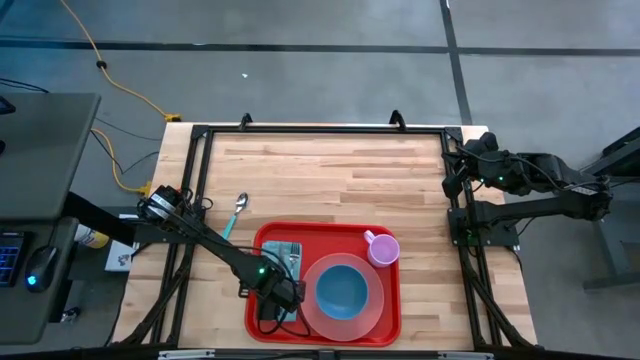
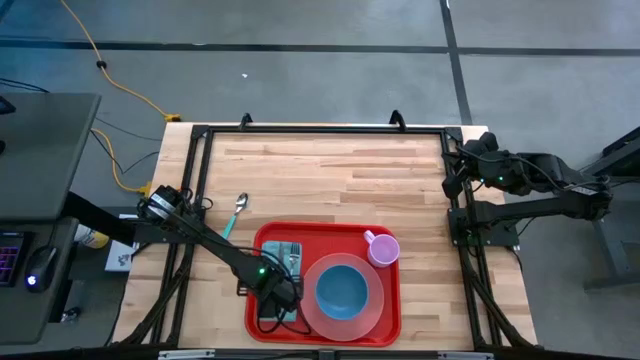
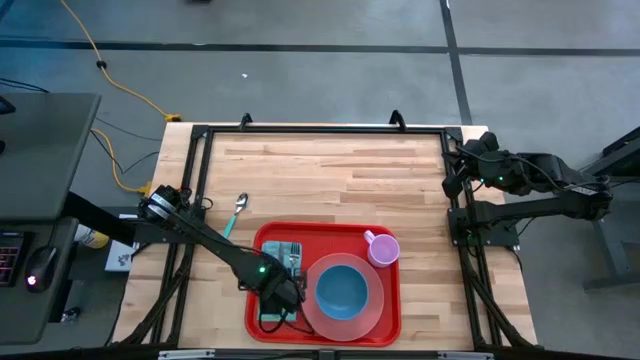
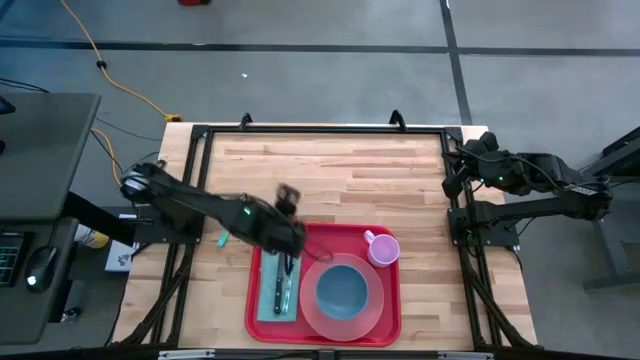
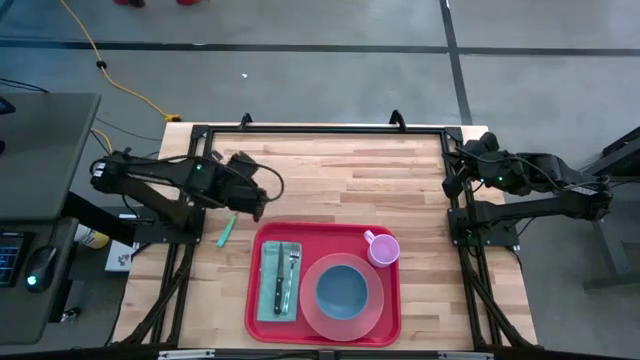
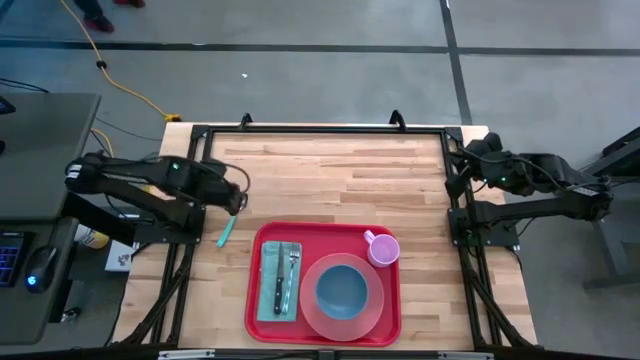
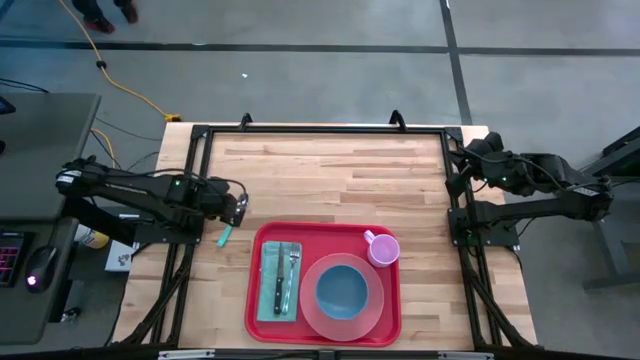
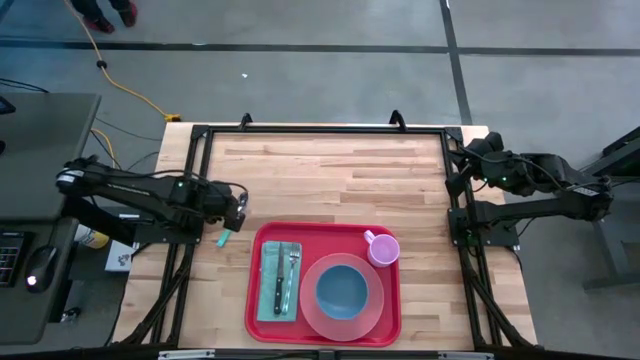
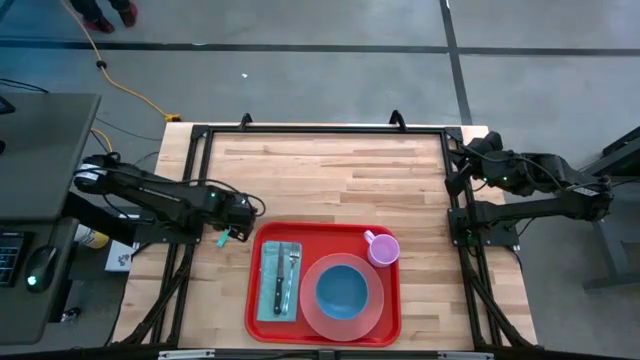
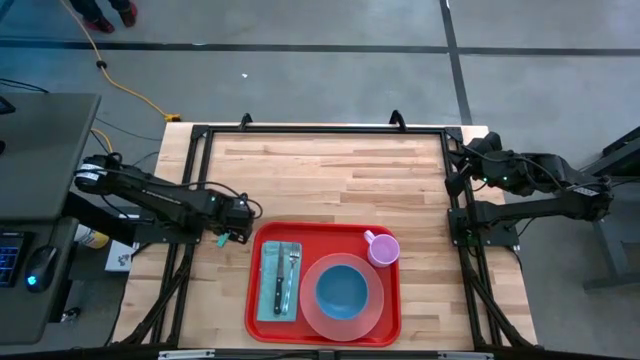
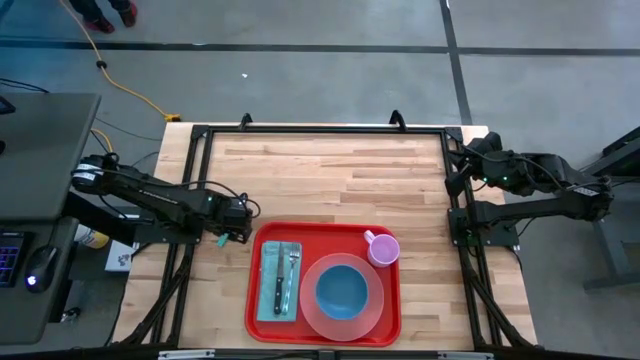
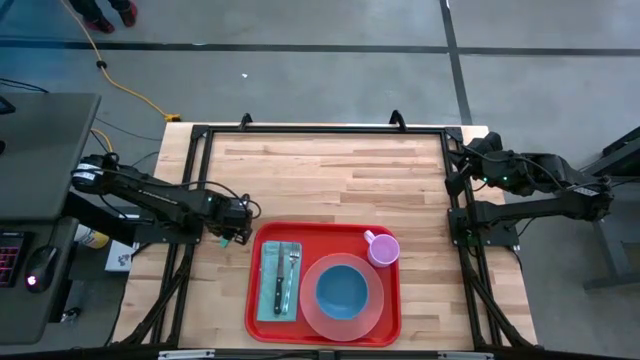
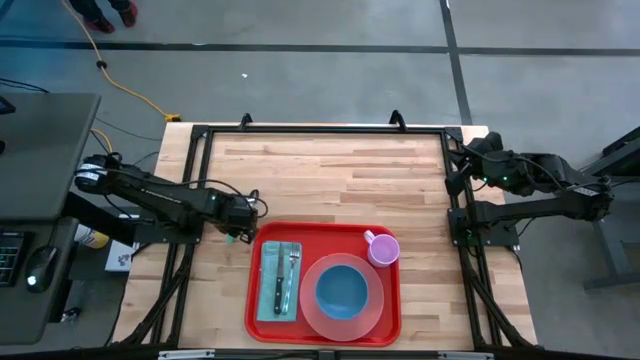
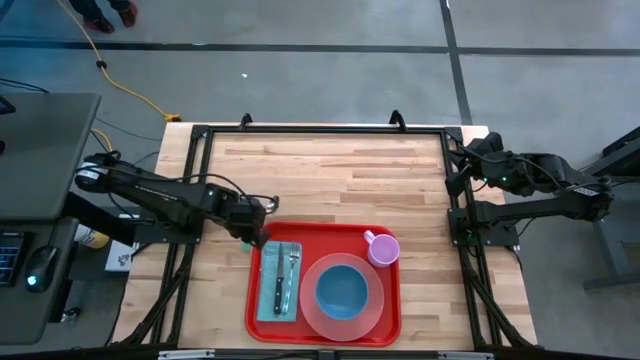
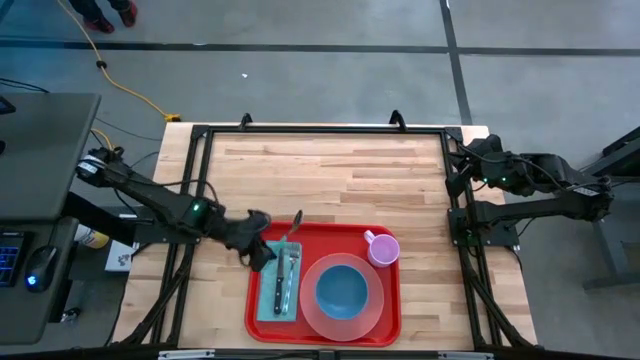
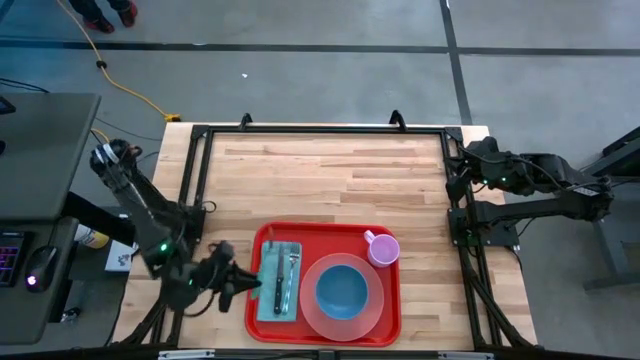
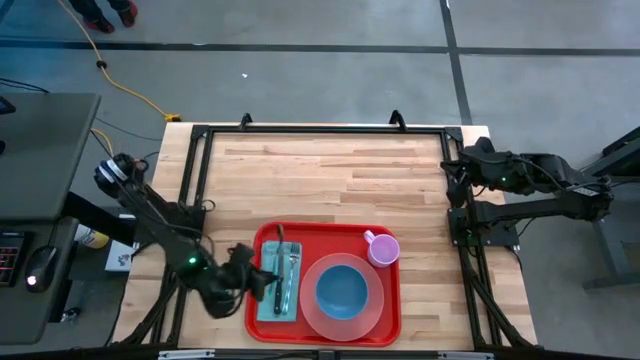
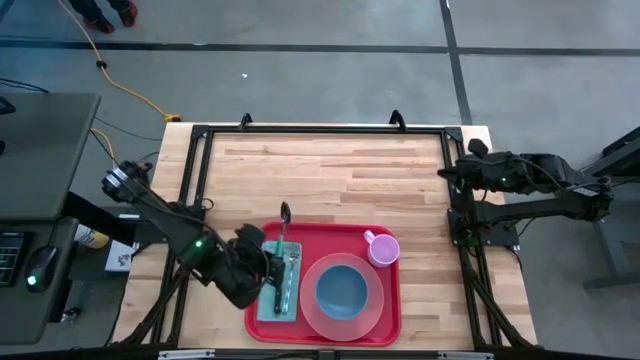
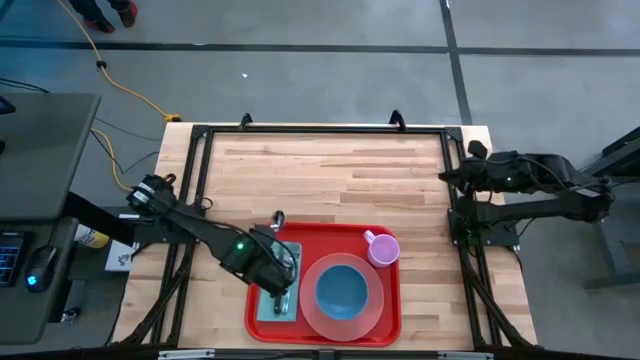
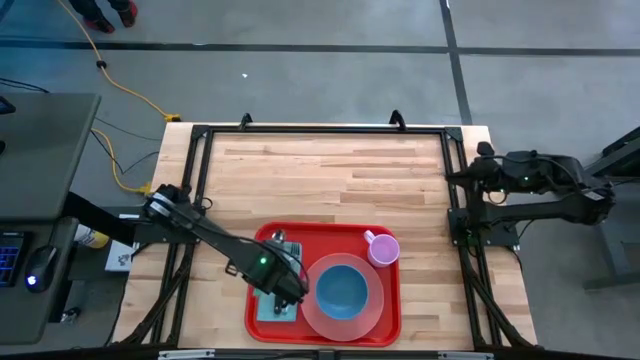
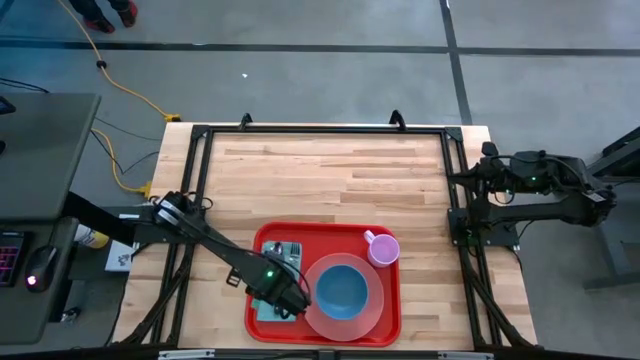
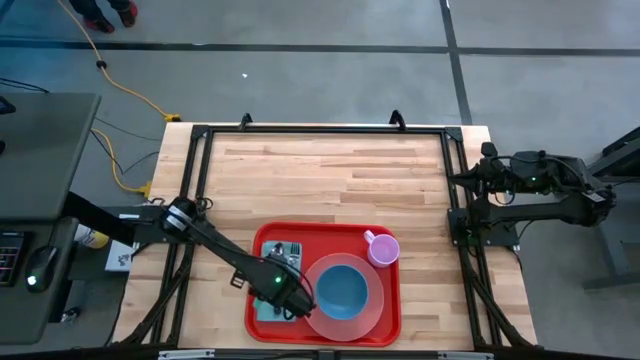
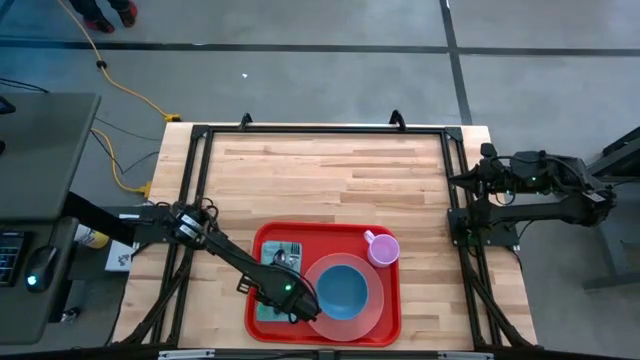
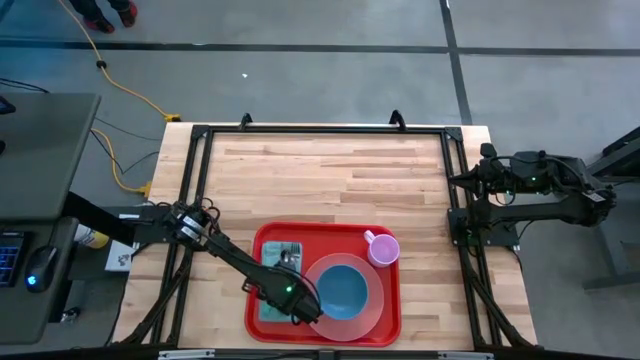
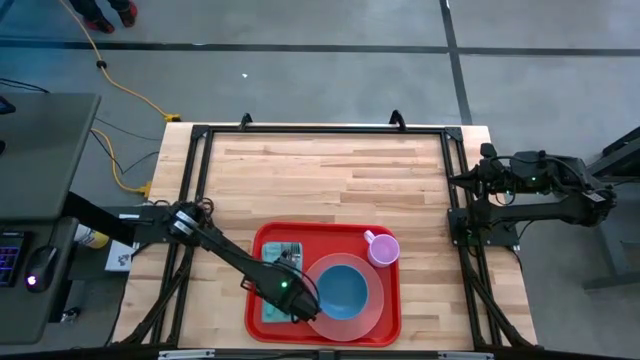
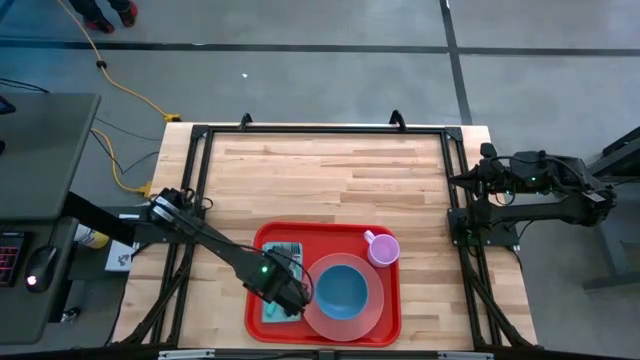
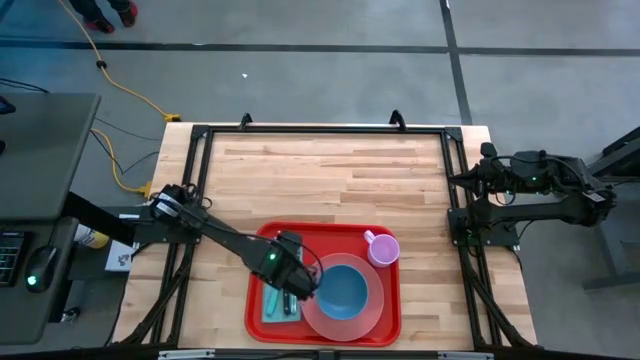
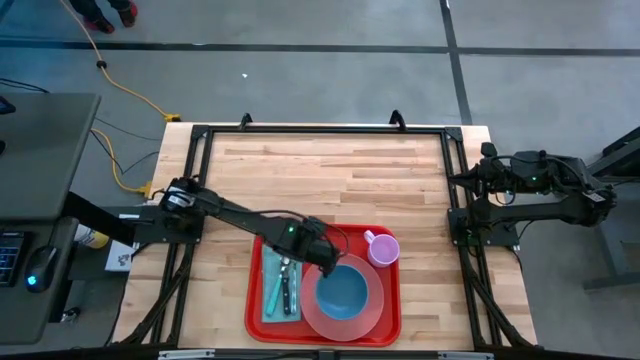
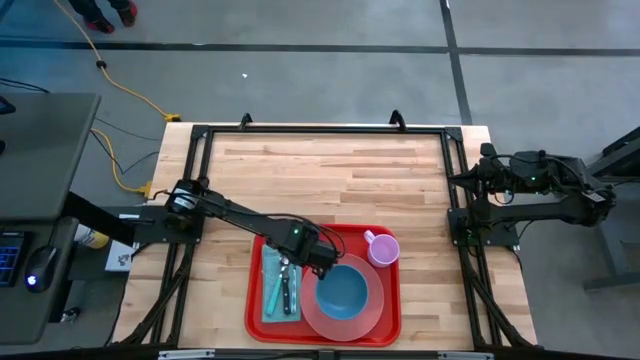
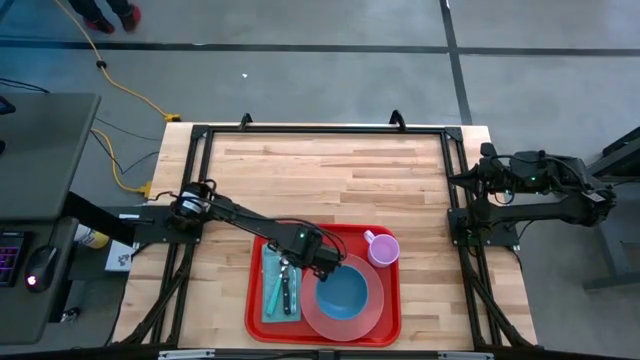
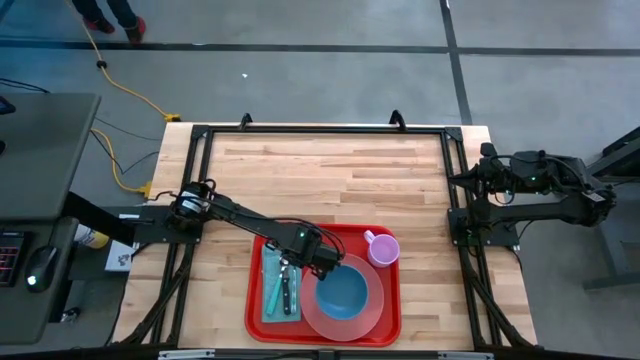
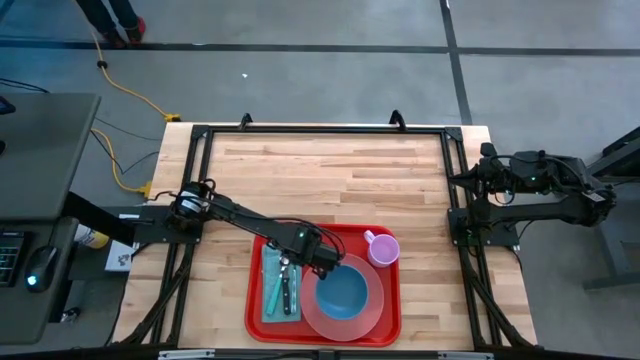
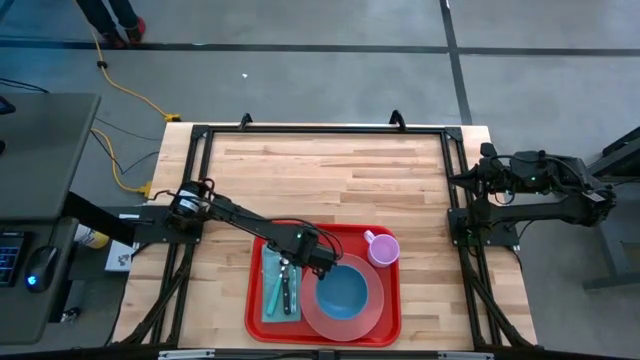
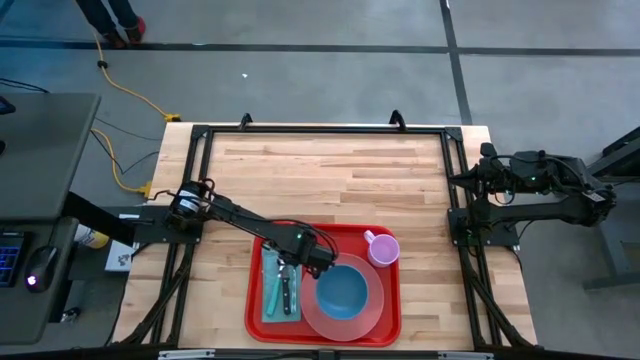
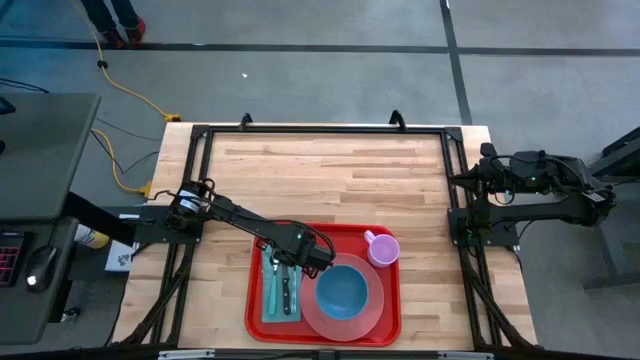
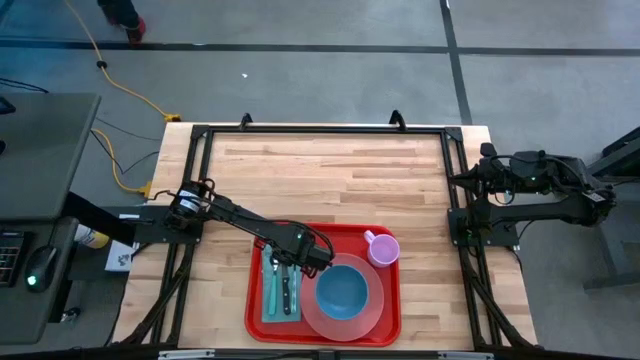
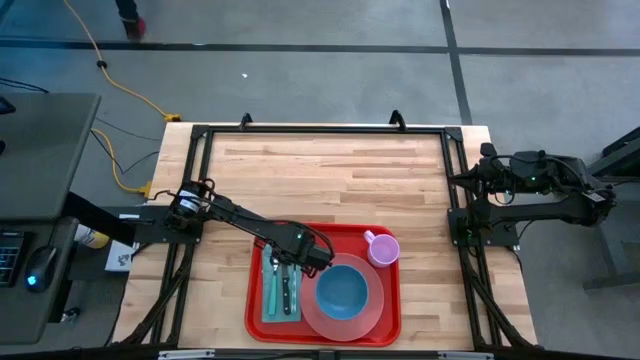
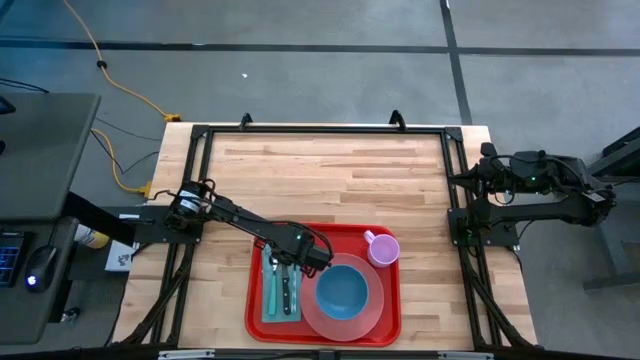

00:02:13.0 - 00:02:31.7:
Task: Set up tray
Put the blue spoon on the blue napkin to the left of the black knife

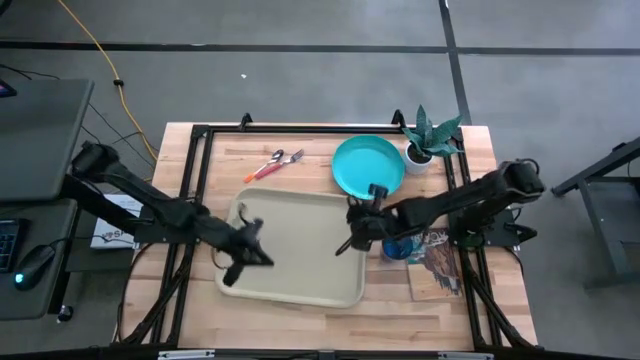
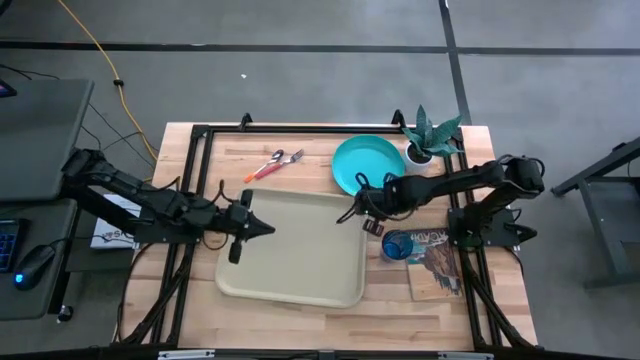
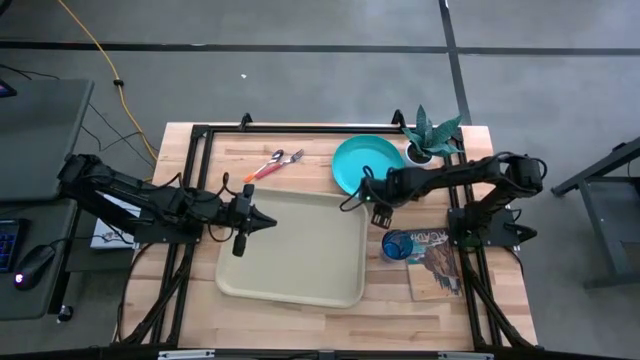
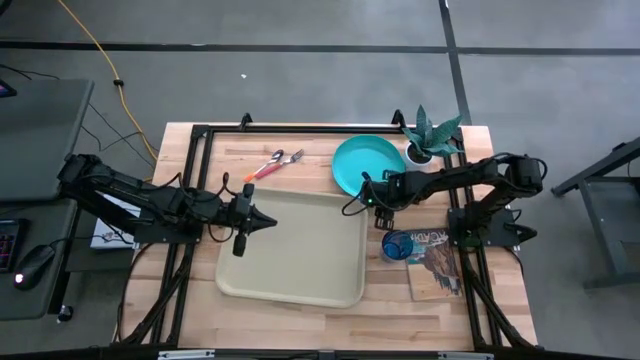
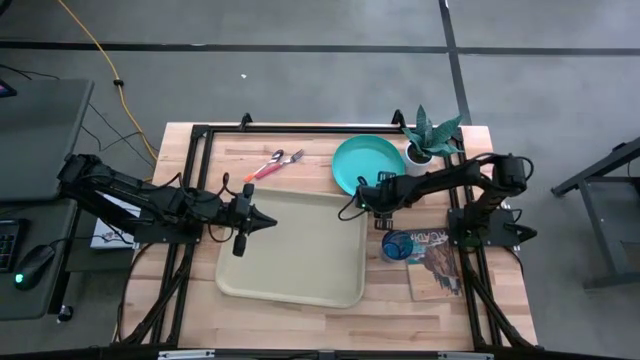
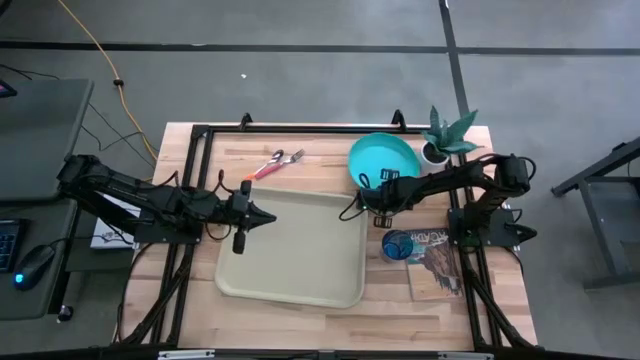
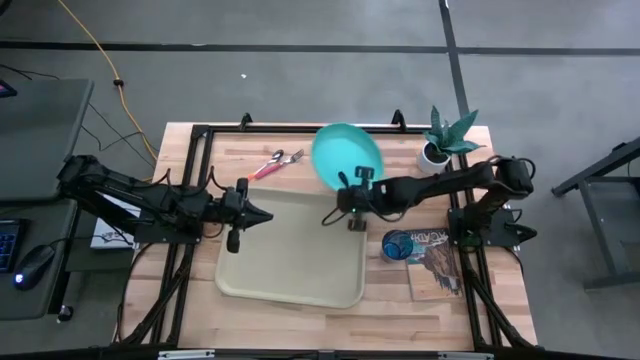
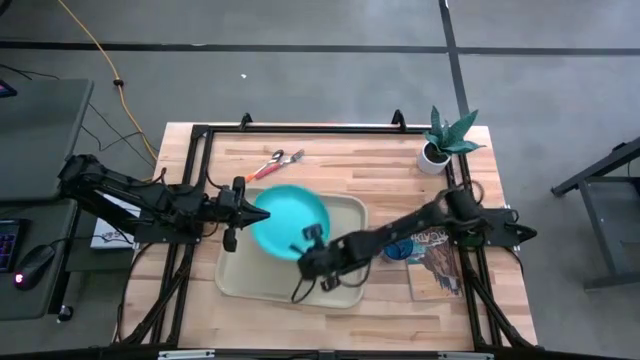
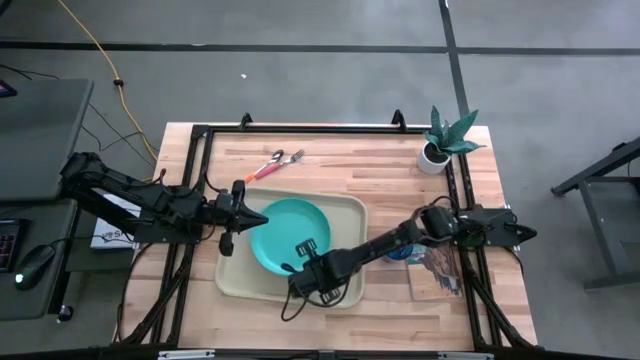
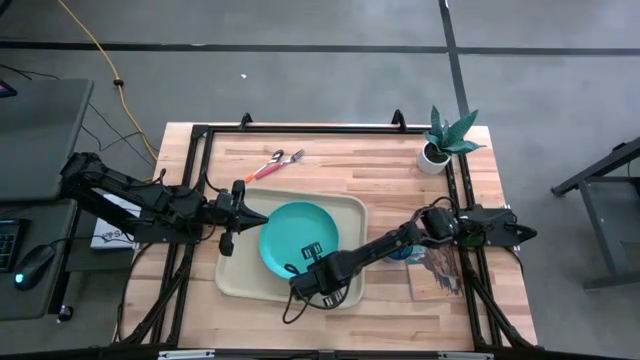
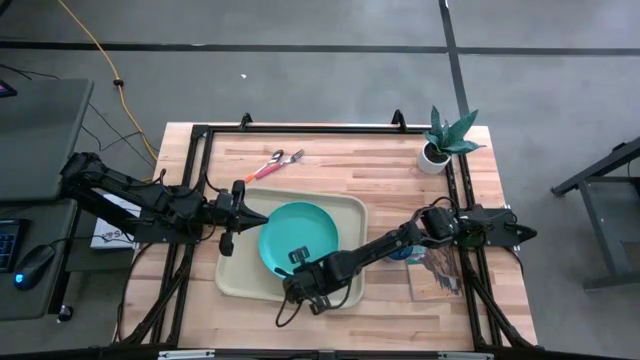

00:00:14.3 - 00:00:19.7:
Task: Pick and place plate/cup/fork/spoon on tray
Put the blue plate in the center of the gray serving tray
